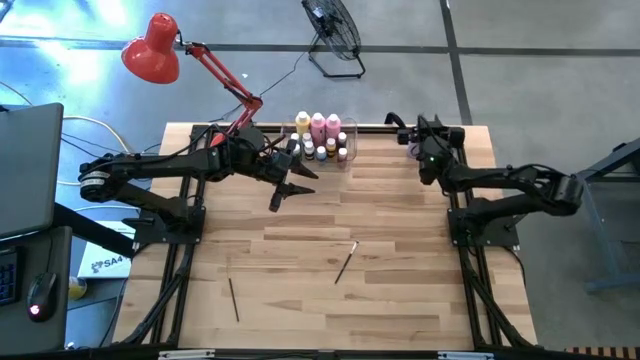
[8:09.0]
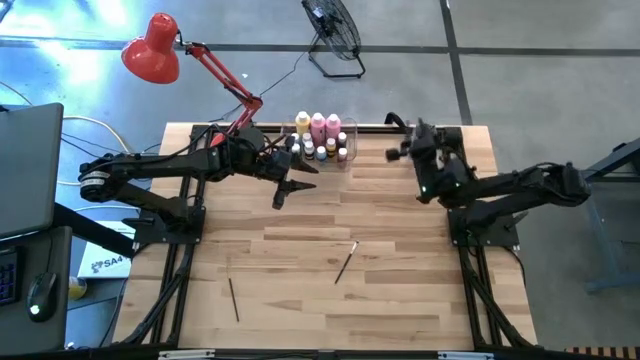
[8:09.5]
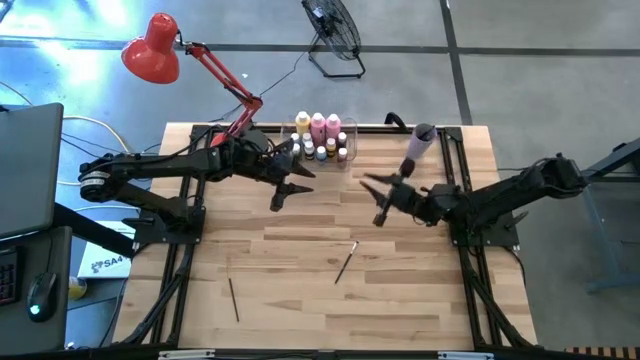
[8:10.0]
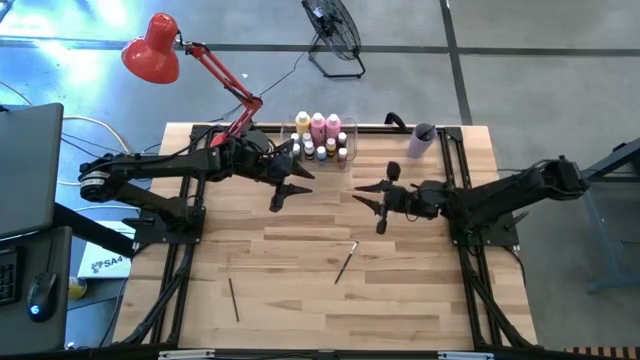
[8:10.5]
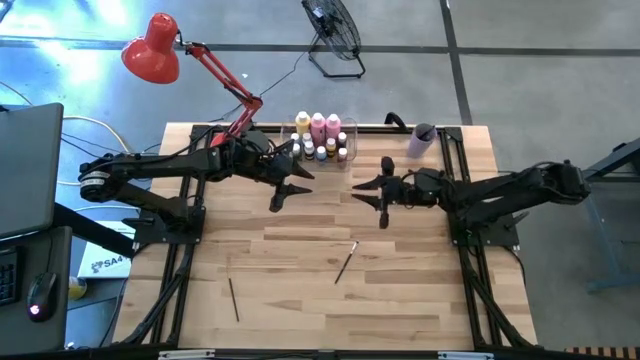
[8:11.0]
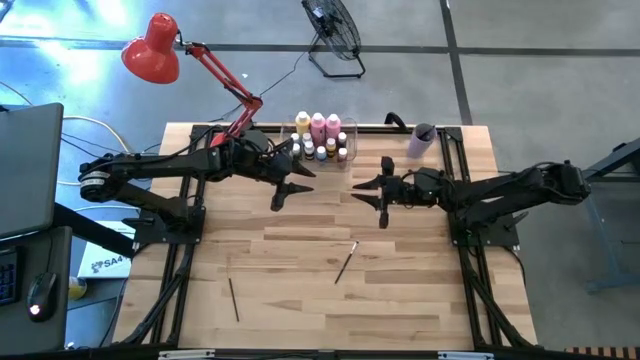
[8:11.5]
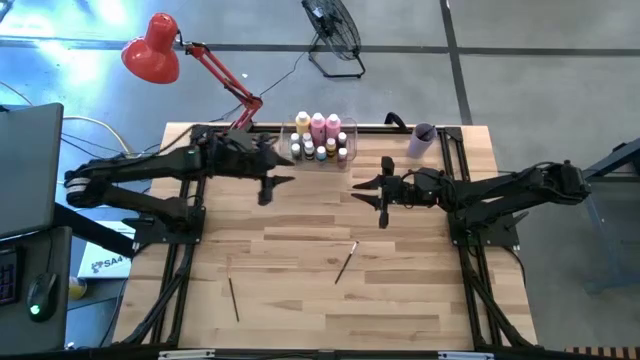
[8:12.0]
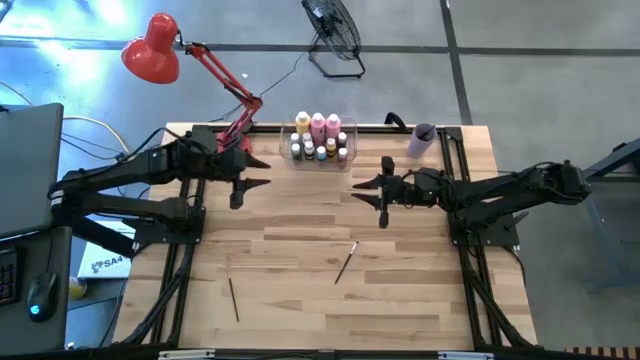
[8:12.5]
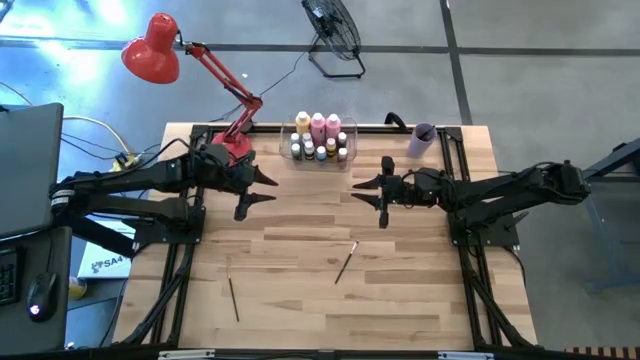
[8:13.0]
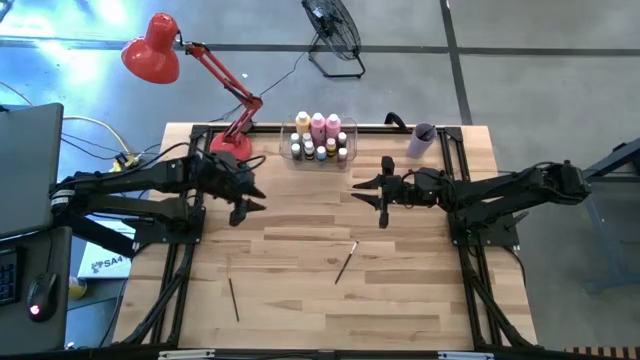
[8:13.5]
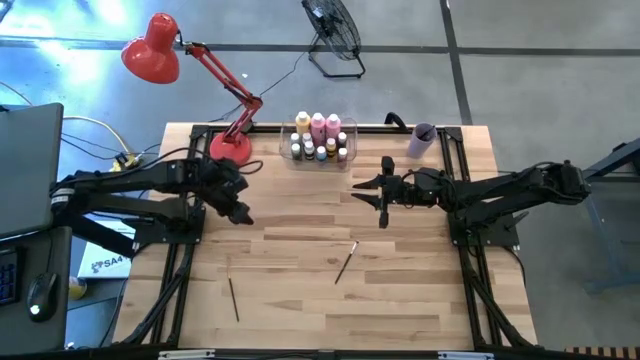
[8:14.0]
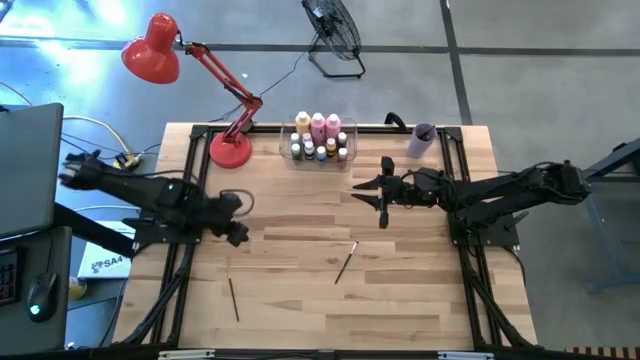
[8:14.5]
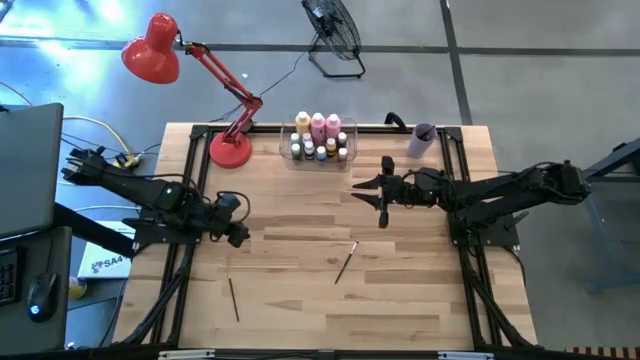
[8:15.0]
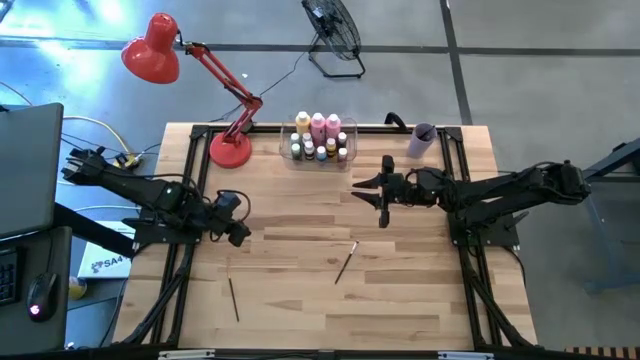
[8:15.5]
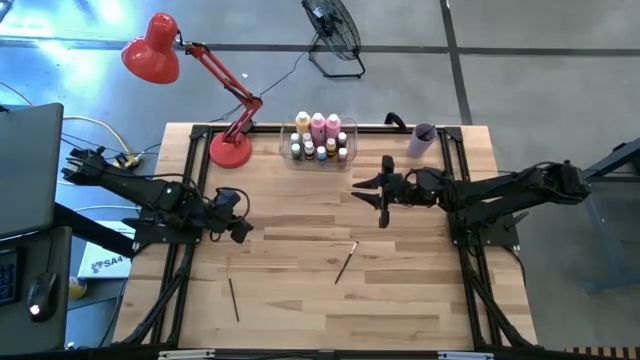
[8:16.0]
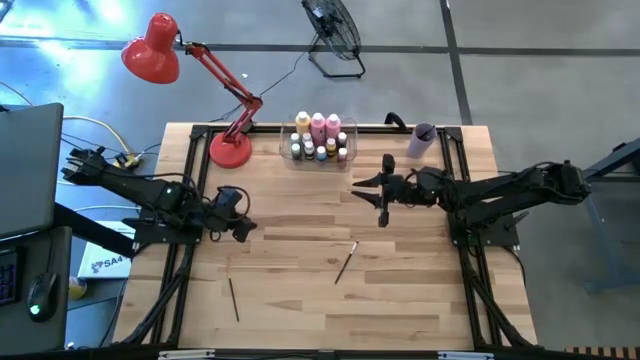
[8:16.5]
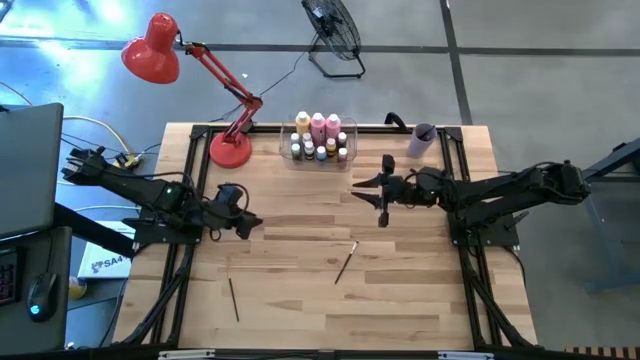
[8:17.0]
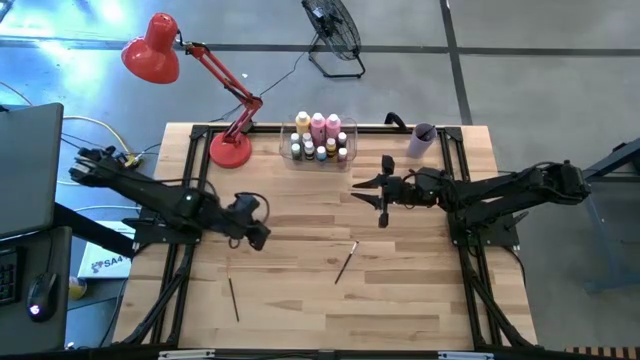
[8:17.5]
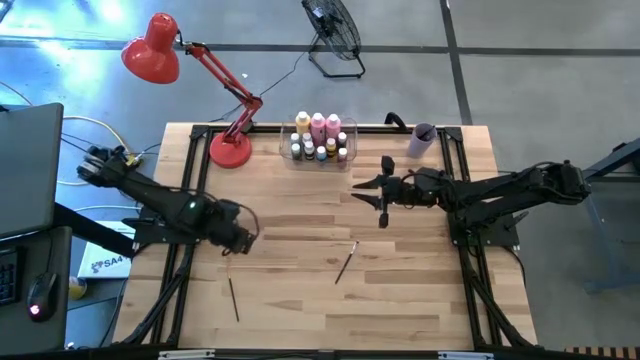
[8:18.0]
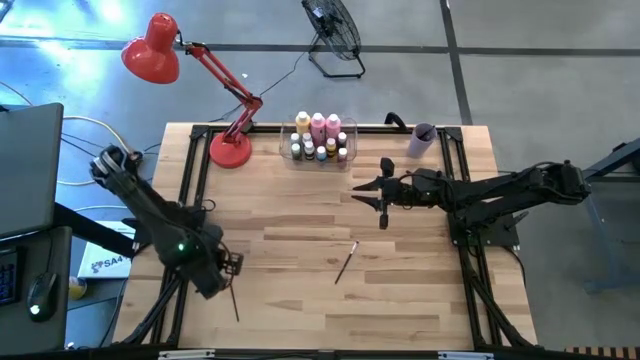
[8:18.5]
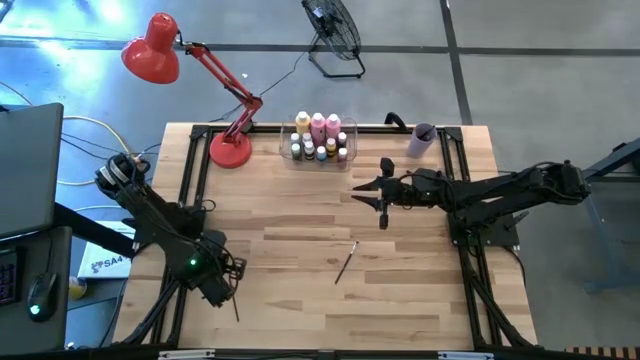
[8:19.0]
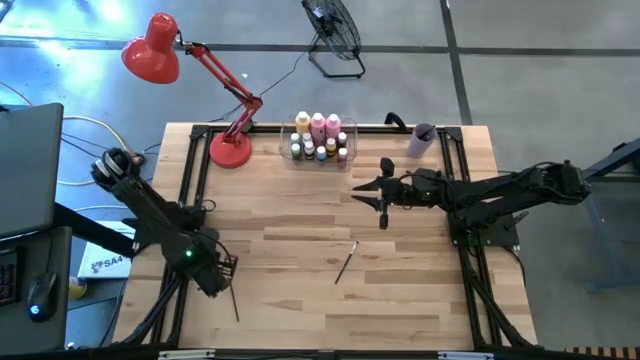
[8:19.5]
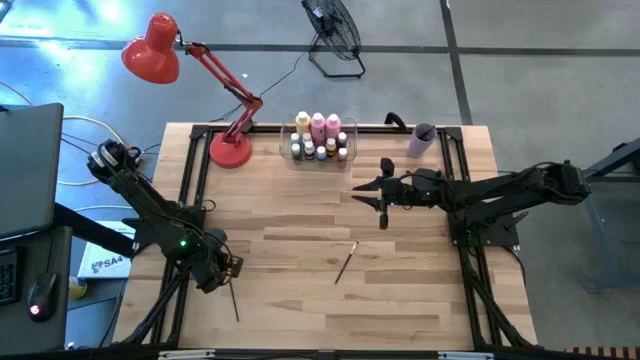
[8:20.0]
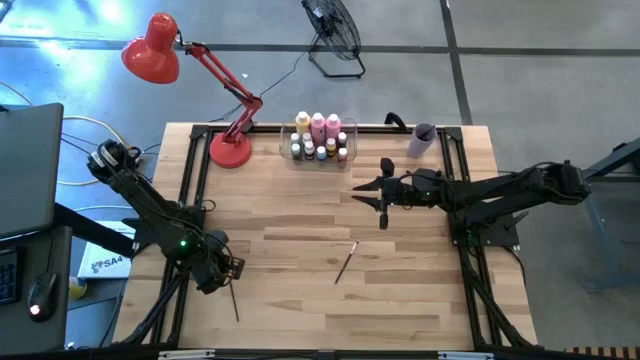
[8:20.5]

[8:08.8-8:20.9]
Task: Pick & Place Paint Supplies
Put the black paint brush into the violet cup

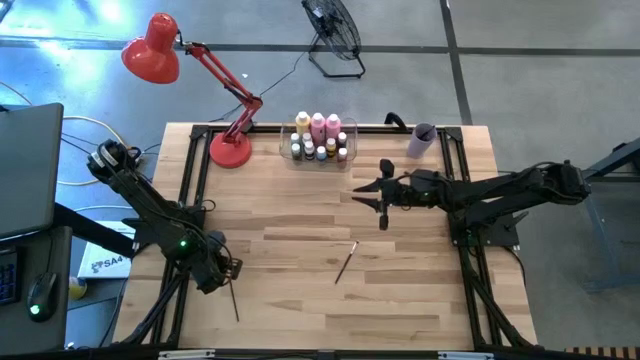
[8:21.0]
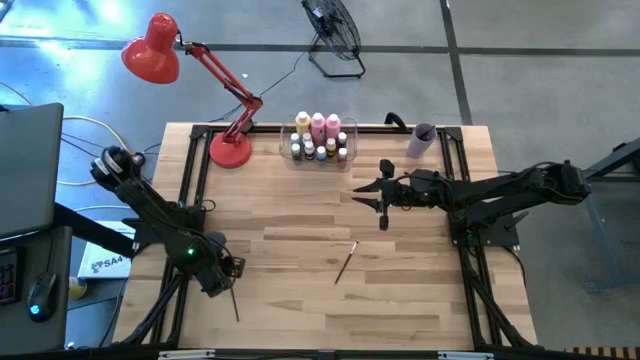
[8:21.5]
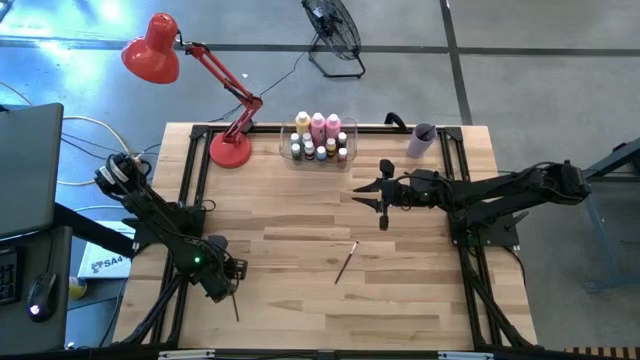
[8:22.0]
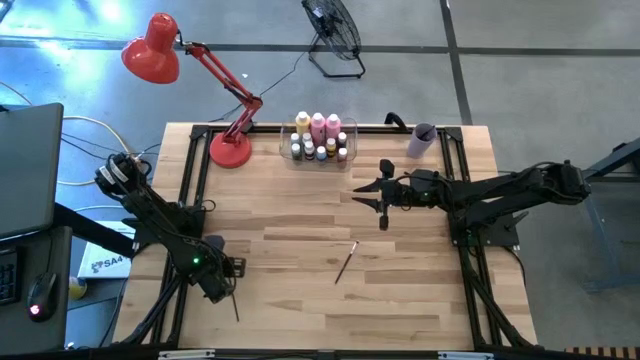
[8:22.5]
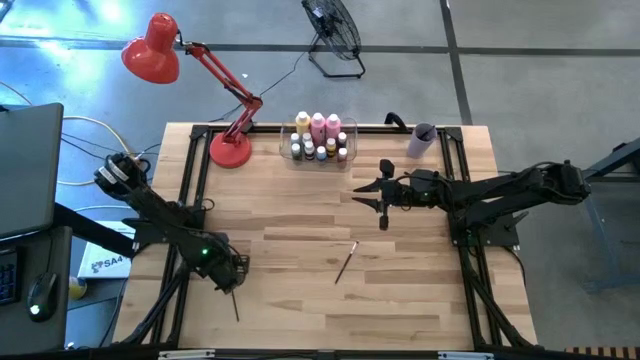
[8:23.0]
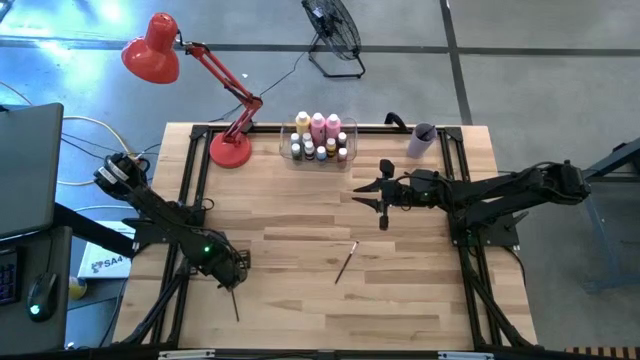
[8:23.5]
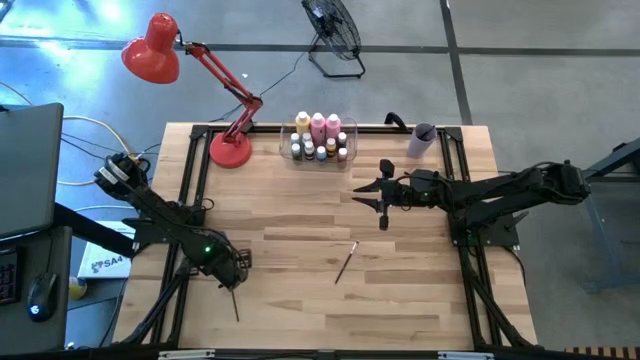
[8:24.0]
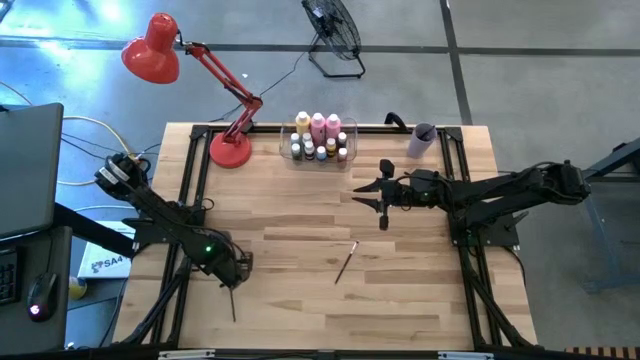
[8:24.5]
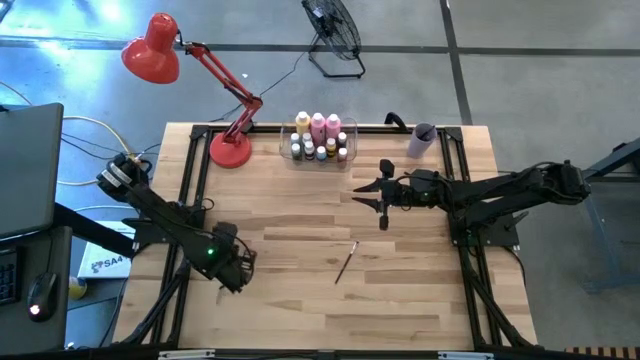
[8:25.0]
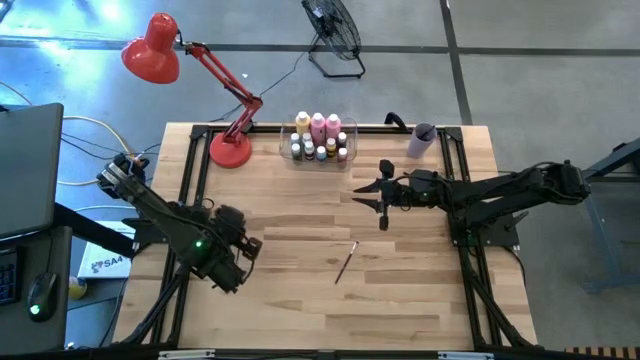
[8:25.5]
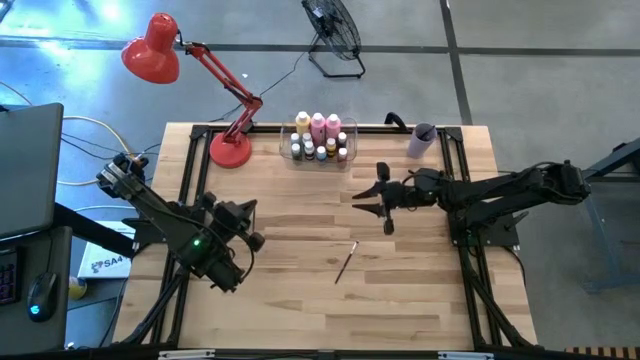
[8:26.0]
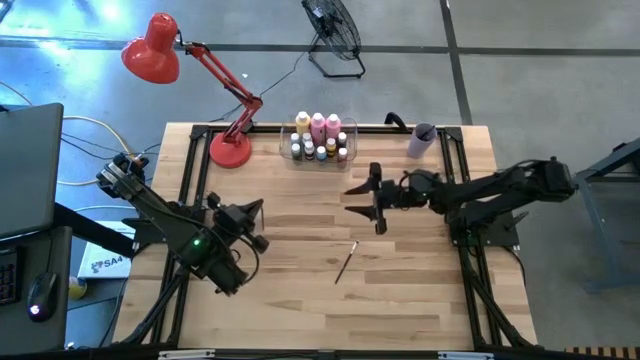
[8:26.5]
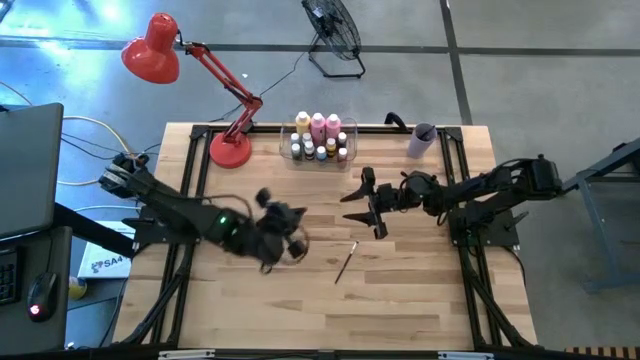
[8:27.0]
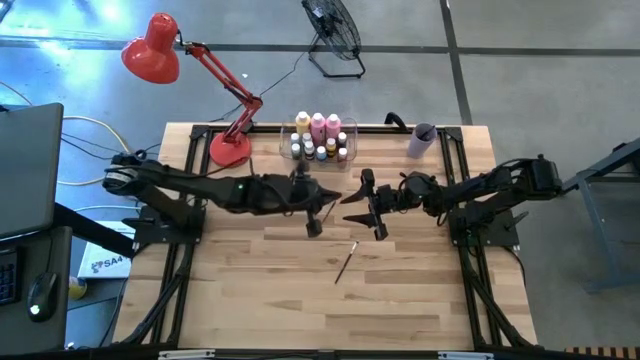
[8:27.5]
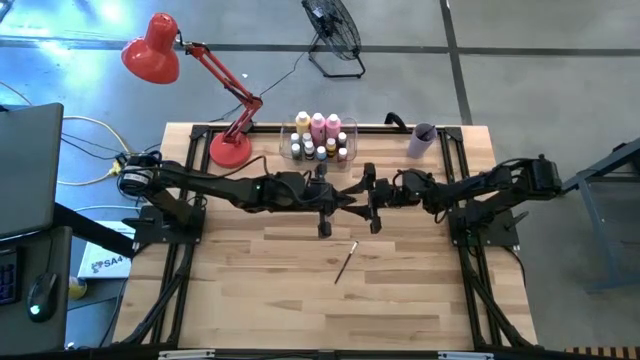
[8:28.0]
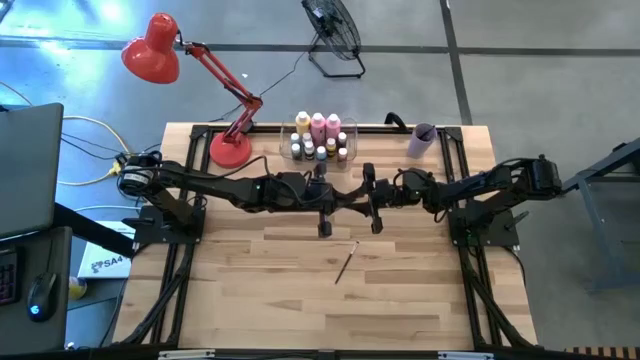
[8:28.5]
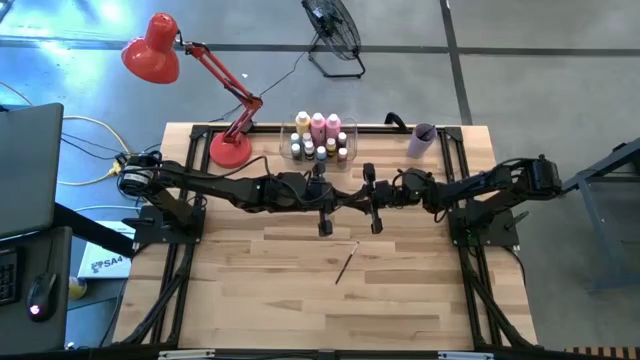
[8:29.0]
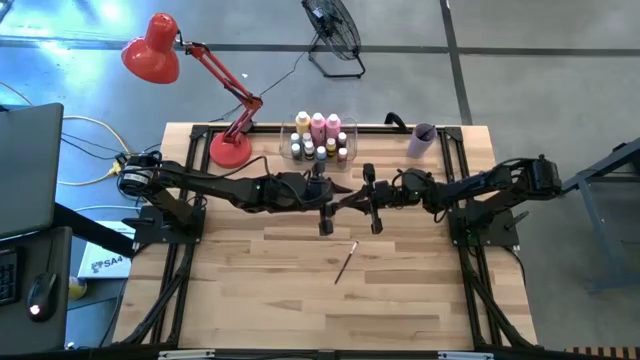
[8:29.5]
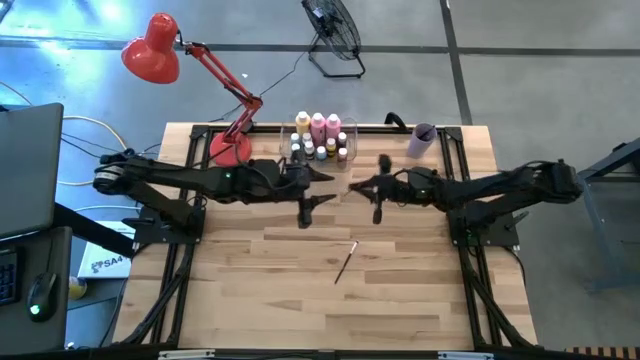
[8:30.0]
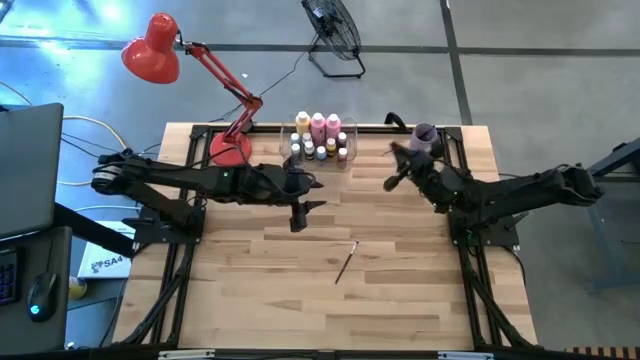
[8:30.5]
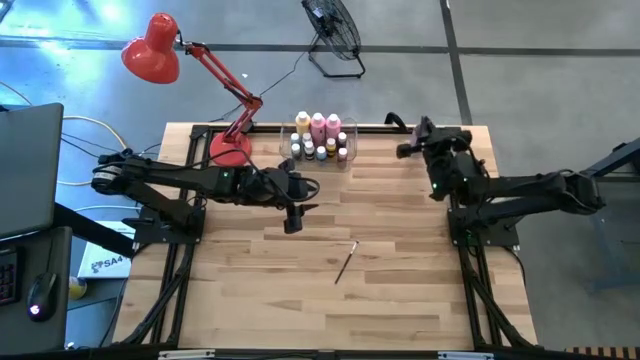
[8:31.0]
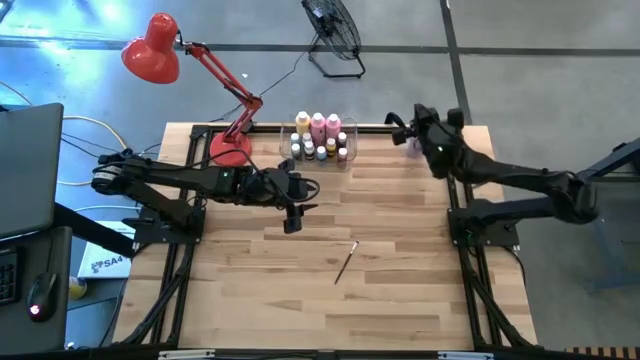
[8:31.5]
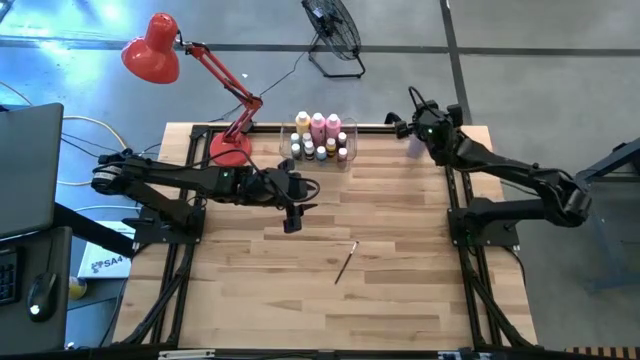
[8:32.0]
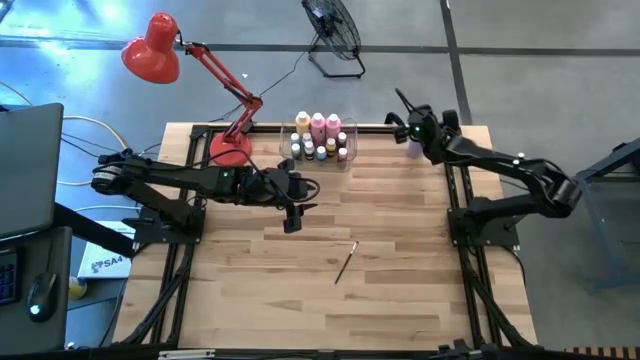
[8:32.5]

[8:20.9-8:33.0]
Put the black paint brush into the violet cup
